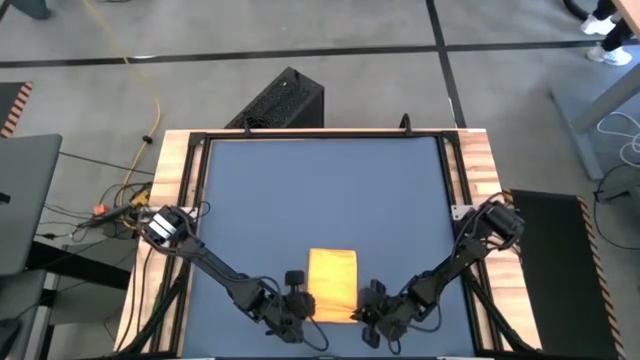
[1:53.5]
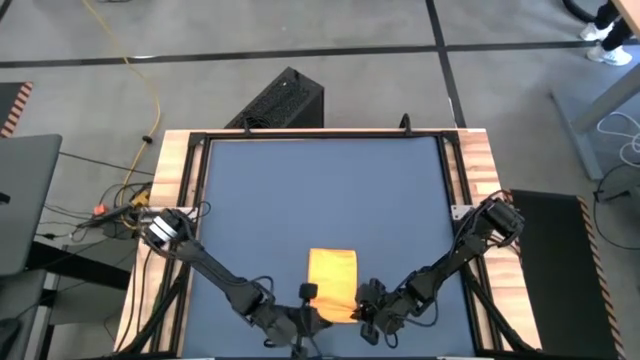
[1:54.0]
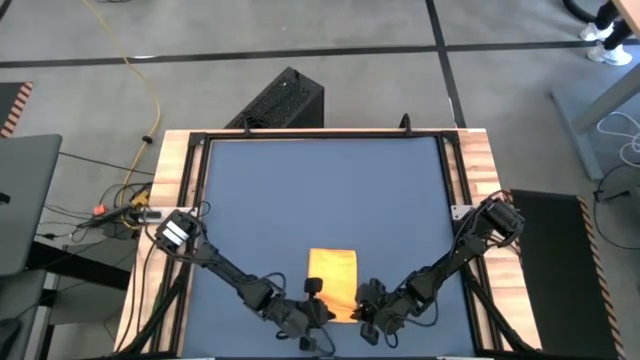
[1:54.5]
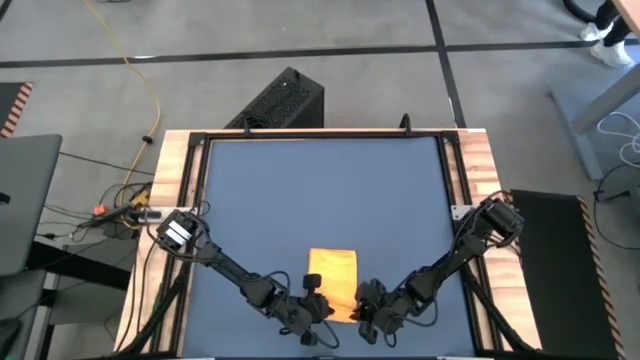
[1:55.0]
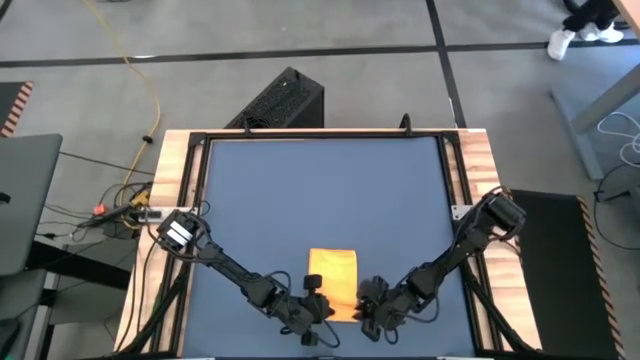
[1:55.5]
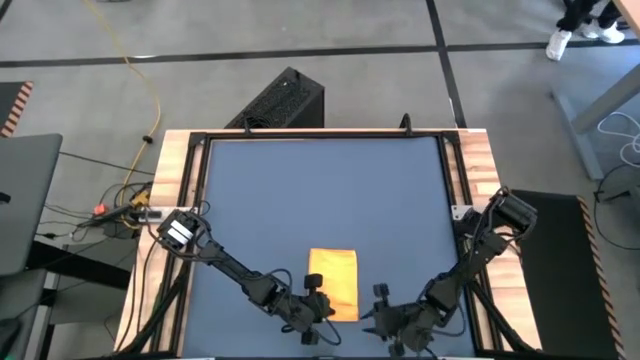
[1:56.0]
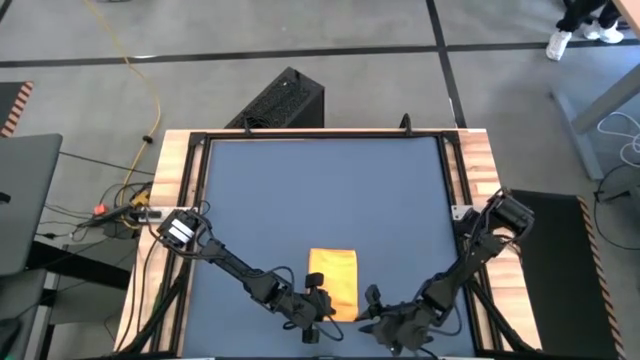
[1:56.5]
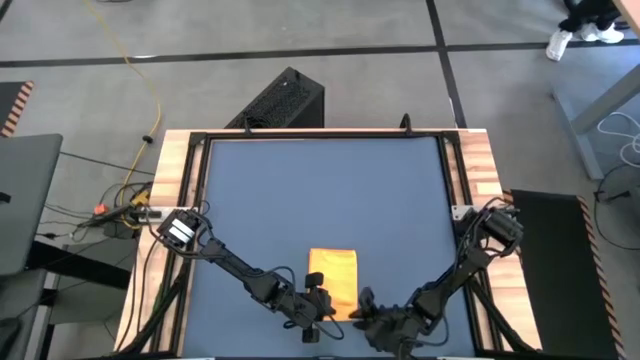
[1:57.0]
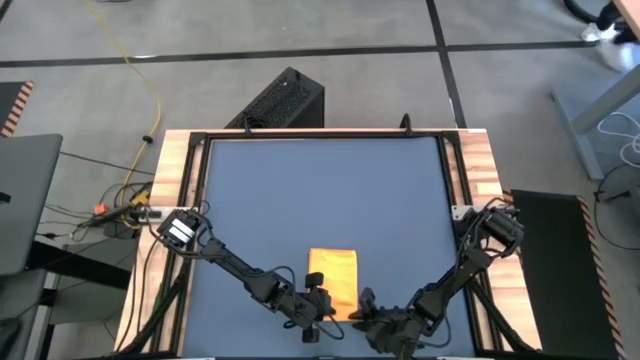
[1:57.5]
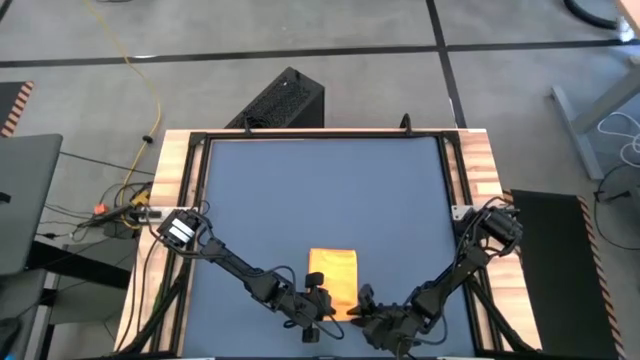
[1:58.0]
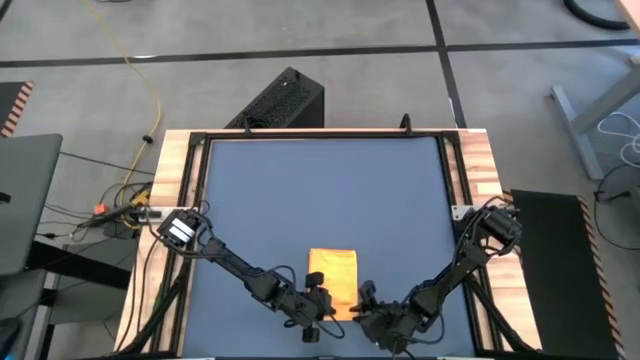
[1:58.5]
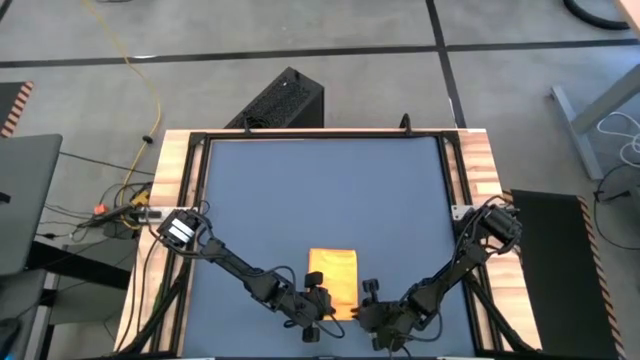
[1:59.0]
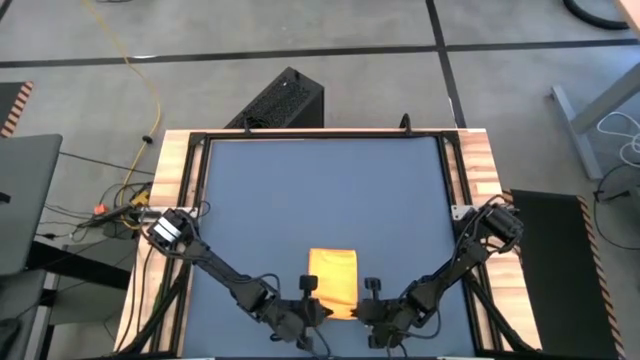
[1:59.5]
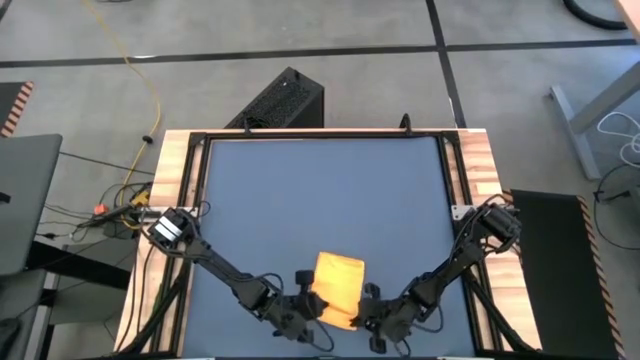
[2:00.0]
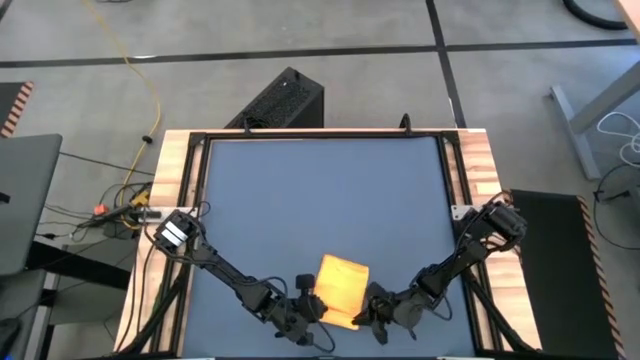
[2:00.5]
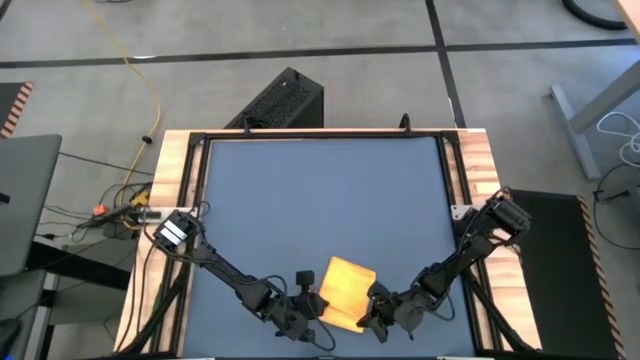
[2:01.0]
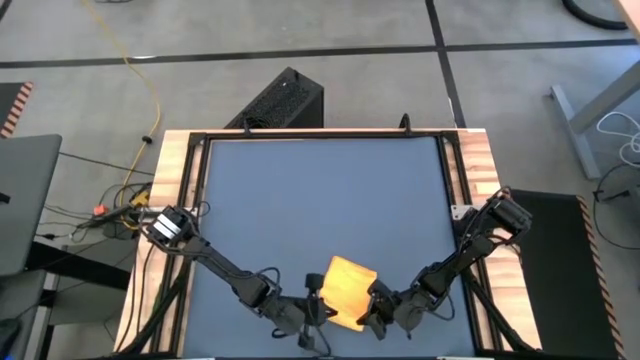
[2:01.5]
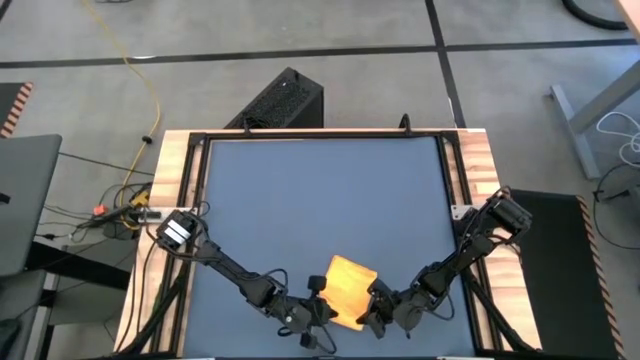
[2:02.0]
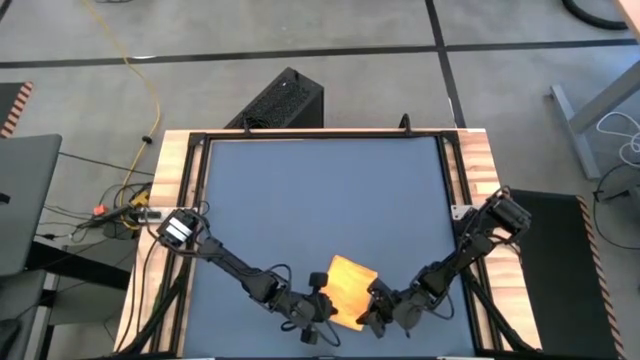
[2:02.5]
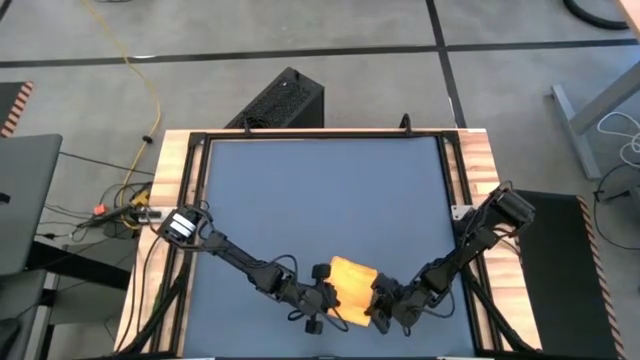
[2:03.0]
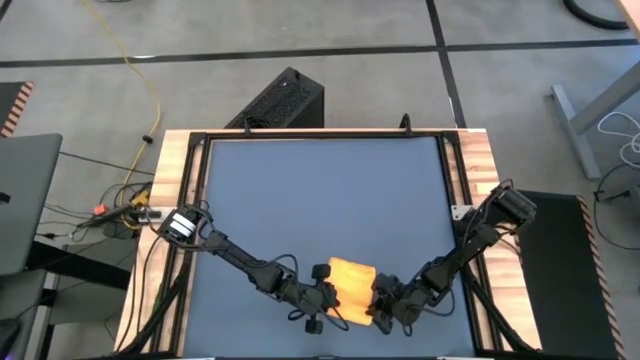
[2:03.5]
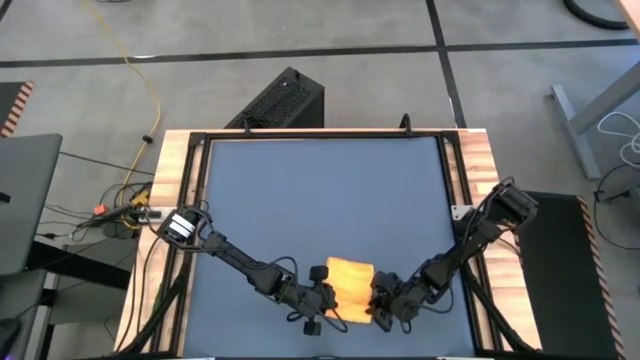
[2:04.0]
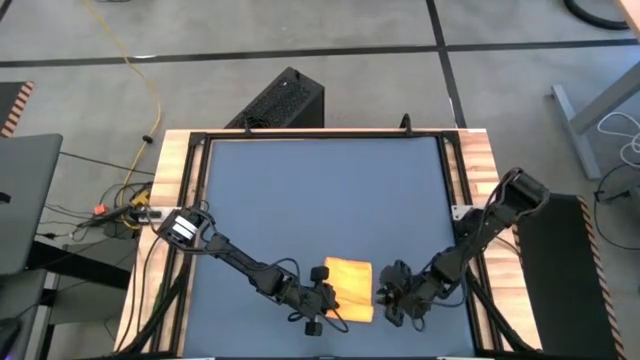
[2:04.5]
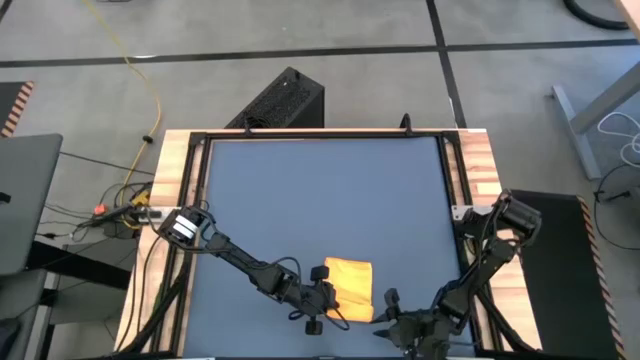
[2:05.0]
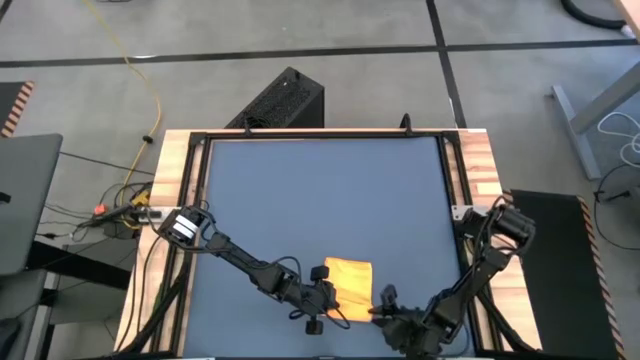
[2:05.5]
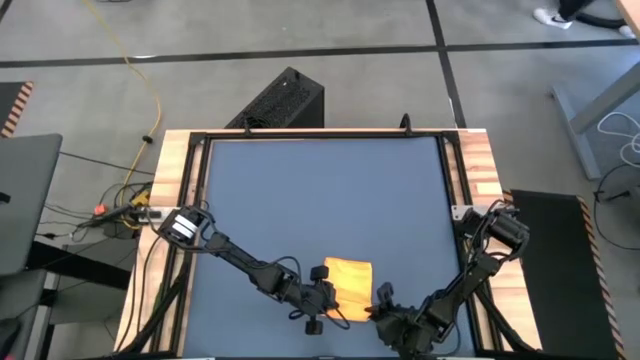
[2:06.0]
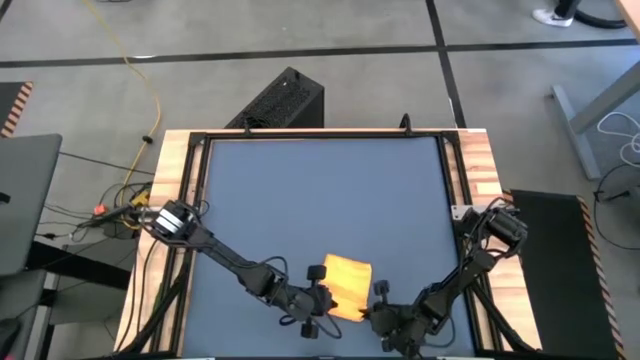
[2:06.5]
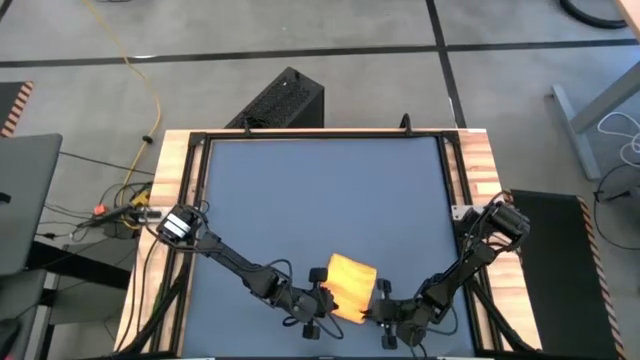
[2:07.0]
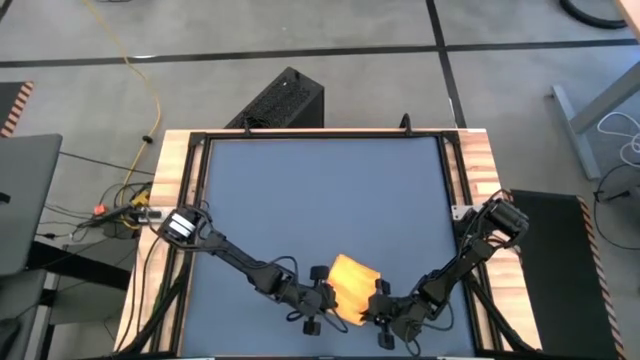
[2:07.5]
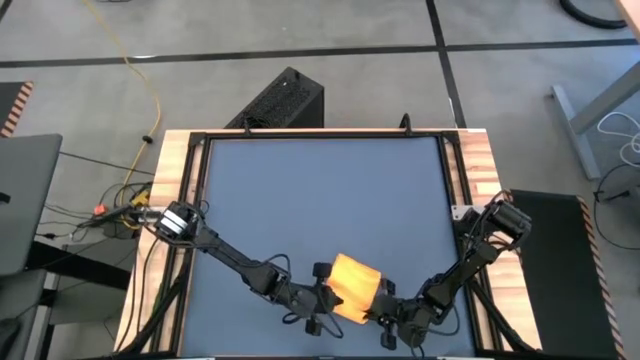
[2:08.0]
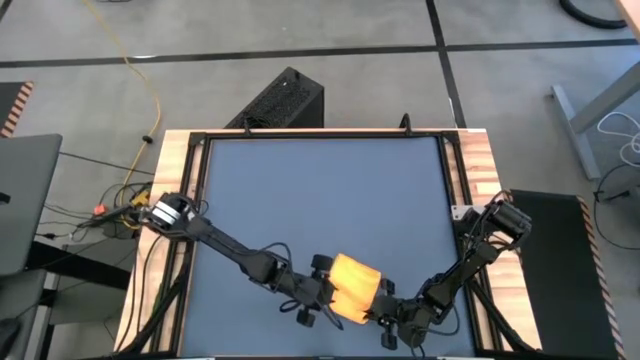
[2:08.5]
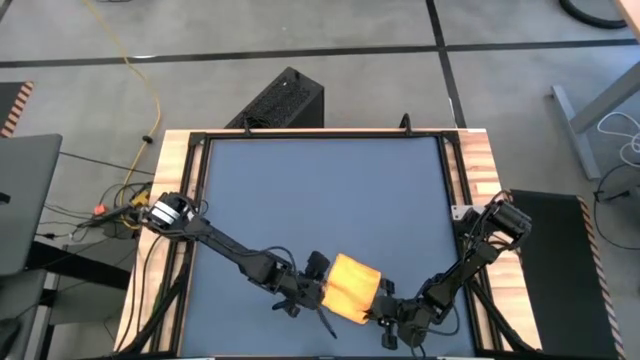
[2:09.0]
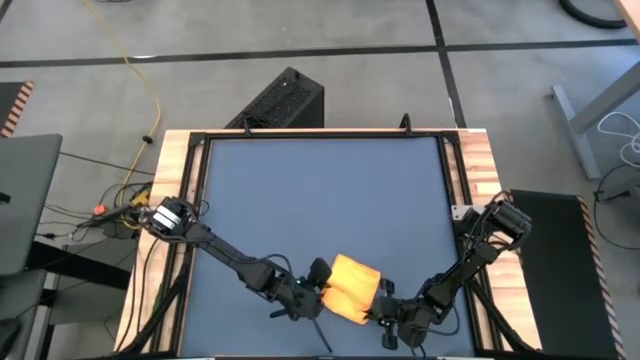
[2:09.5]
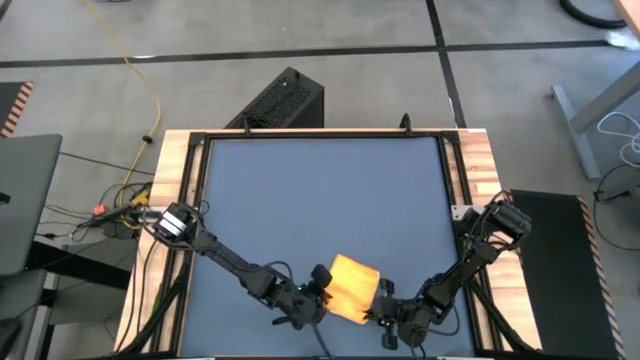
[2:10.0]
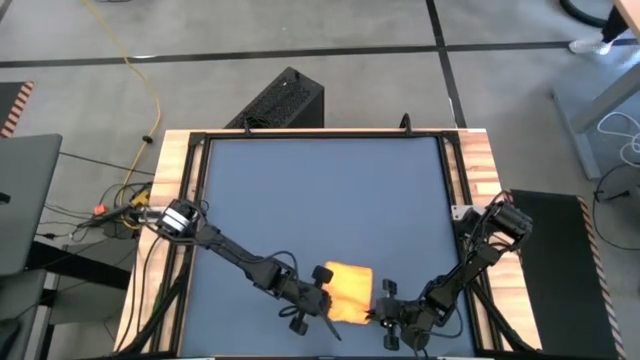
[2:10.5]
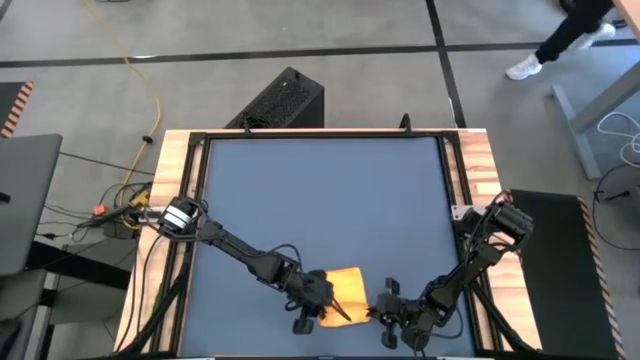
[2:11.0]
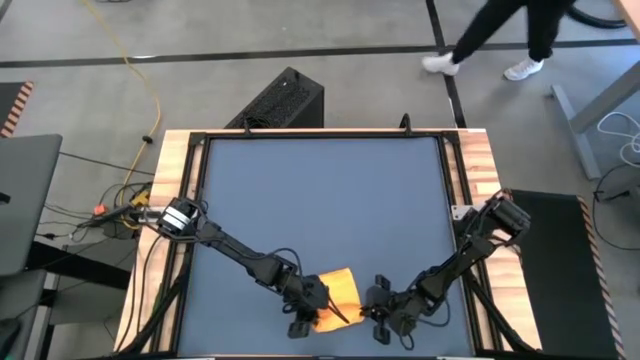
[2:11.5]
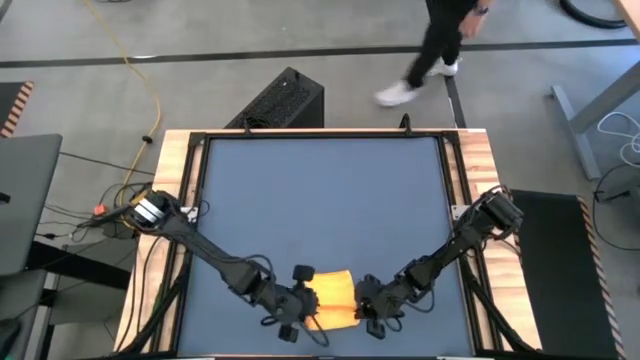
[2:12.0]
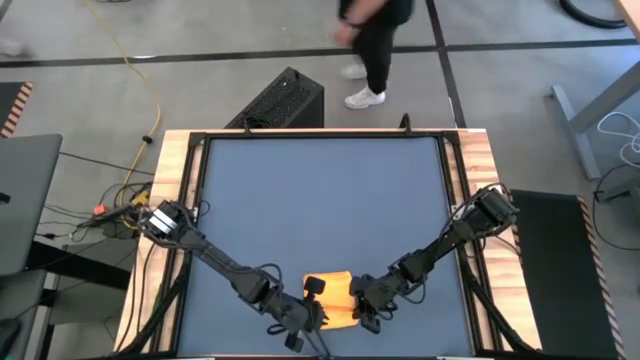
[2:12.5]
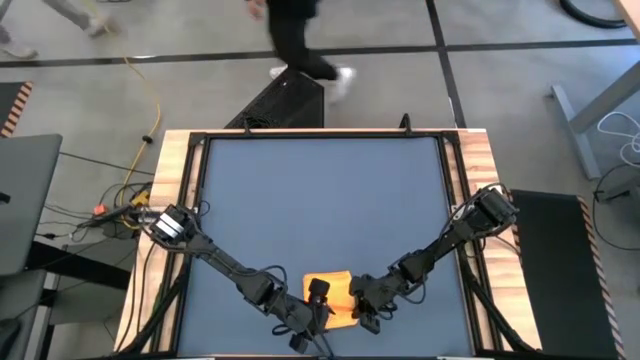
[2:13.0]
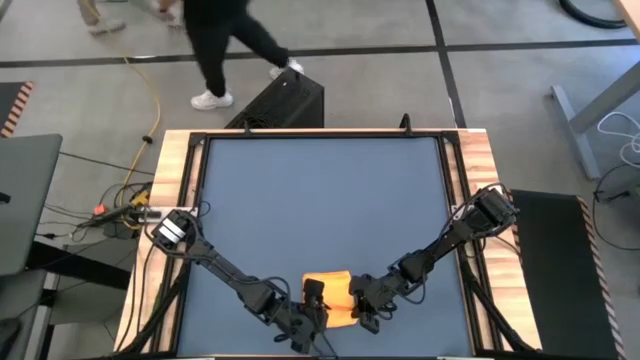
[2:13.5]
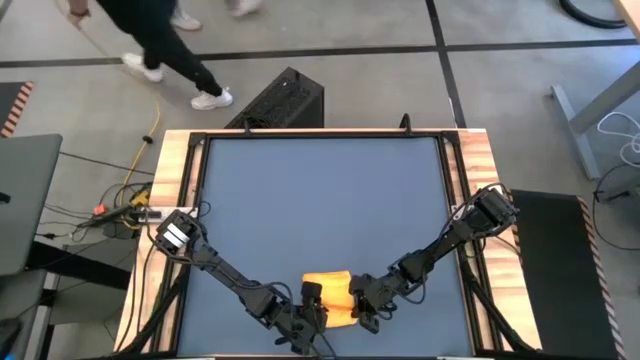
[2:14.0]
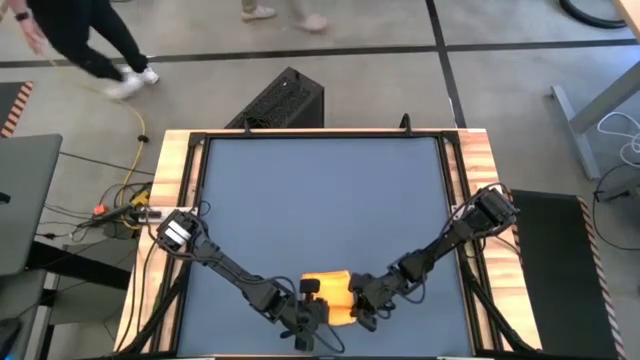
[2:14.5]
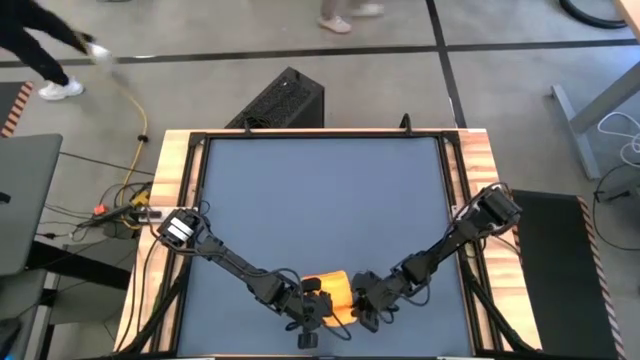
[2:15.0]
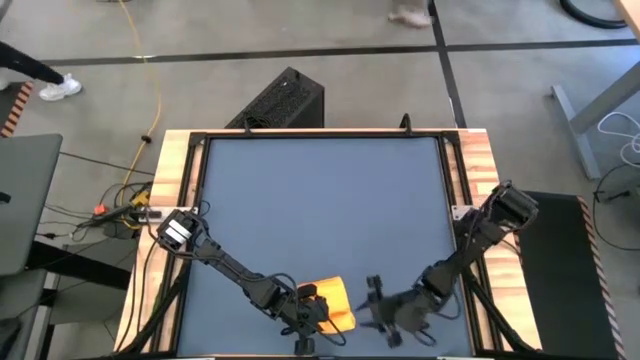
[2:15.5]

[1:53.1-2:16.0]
Task: Roll towel into tight, uniform cylinder
Roll the orange microfiber towel
